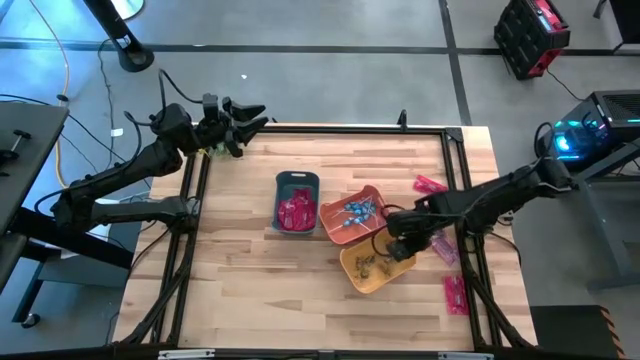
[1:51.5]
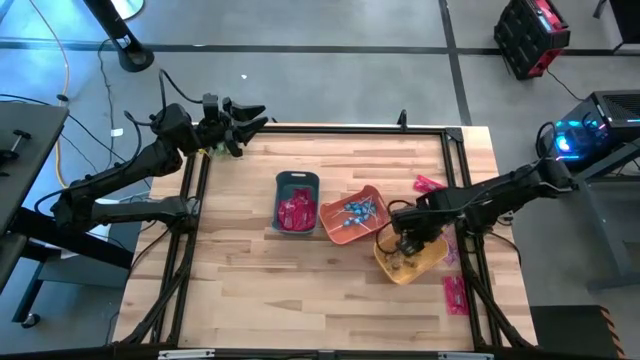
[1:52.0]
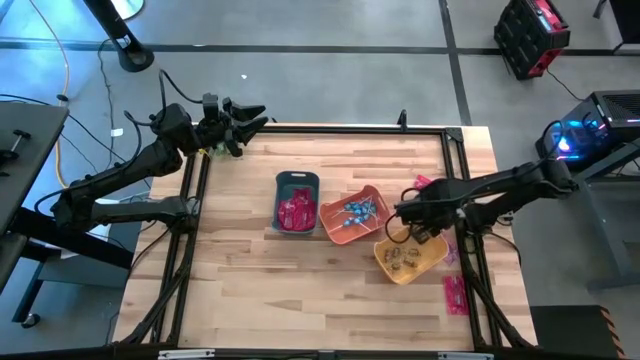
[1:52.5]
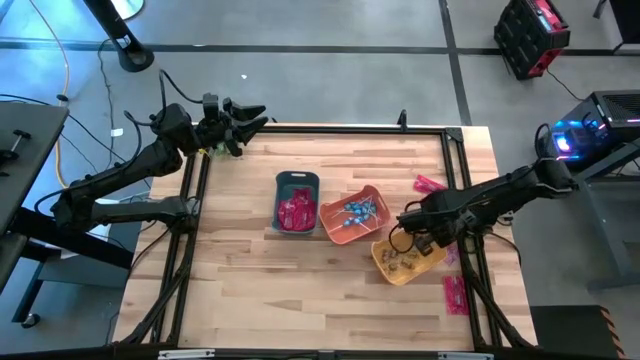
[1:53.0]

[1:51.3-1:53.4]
Task: Sort candy
Adjust the yellow bin

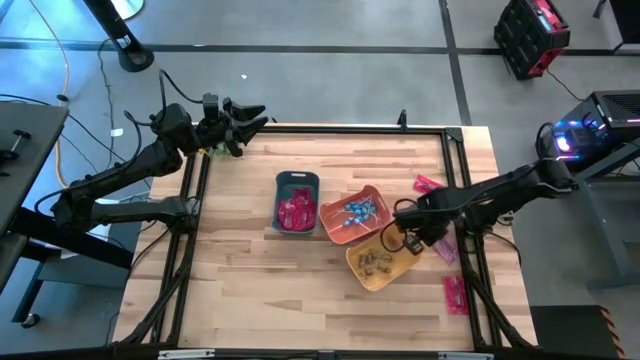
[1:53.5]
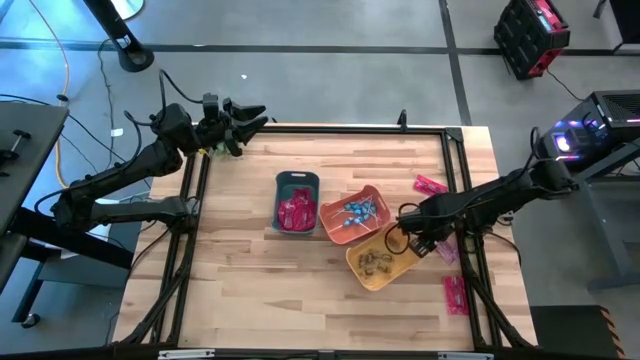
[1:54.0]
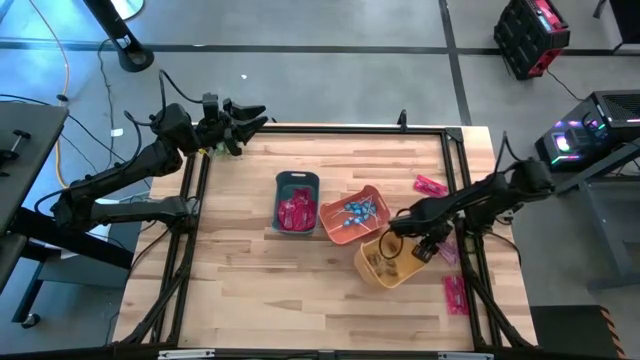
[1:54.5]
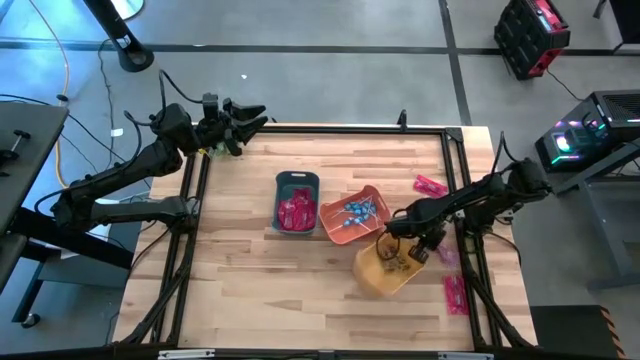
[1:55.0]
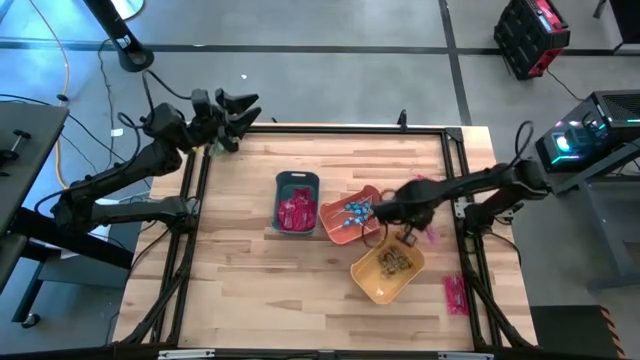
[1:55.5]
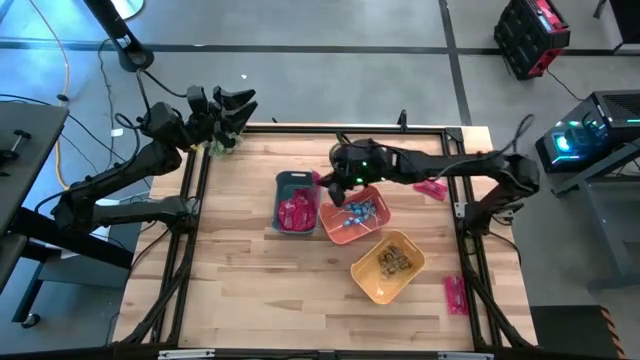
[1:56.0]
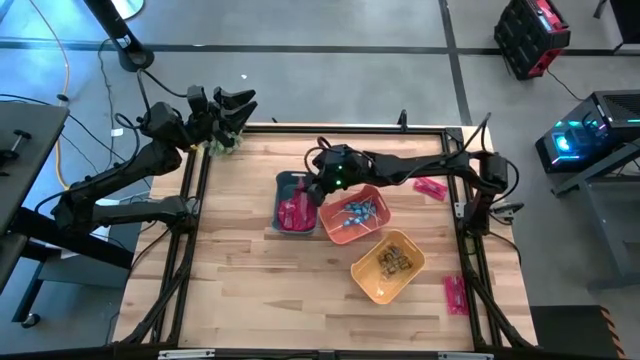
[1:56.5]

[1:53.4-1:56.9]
Put the red candy pack into the blue bin

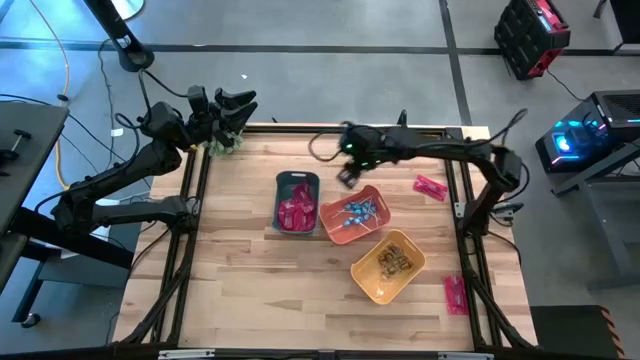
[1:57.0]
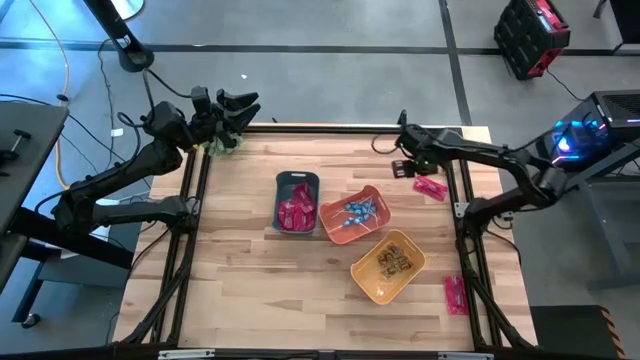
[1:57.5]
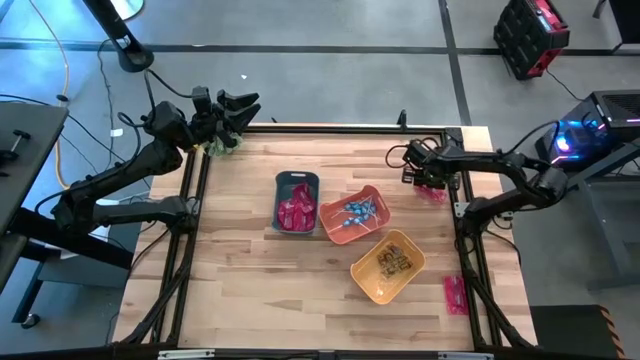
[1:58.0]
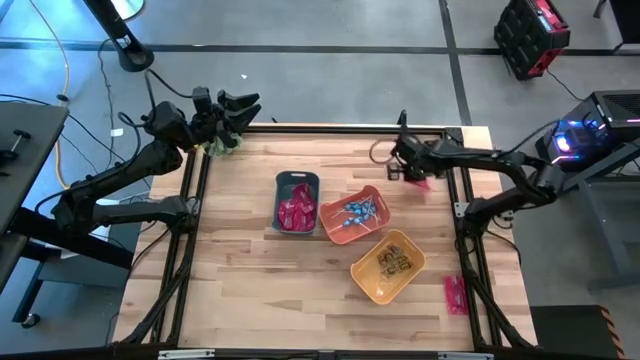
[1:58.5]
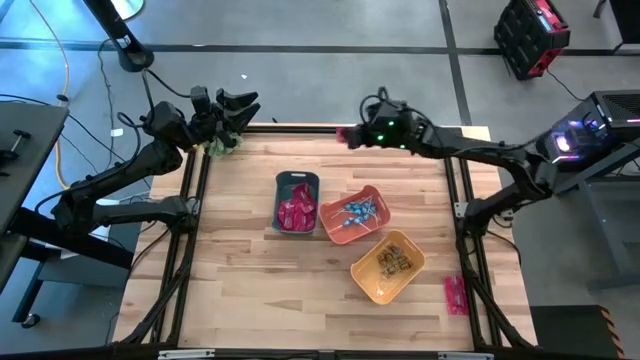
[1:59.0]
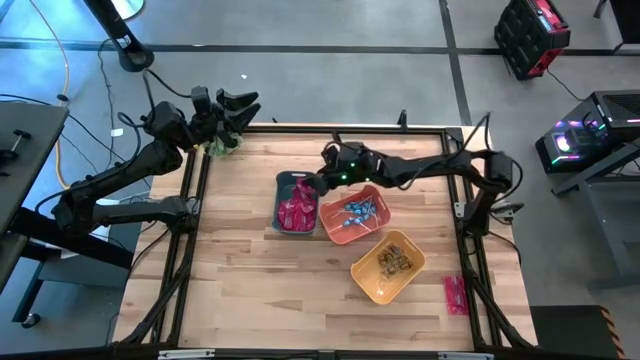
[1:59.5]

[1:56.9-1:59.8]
Put the red candy pack into the blue bin

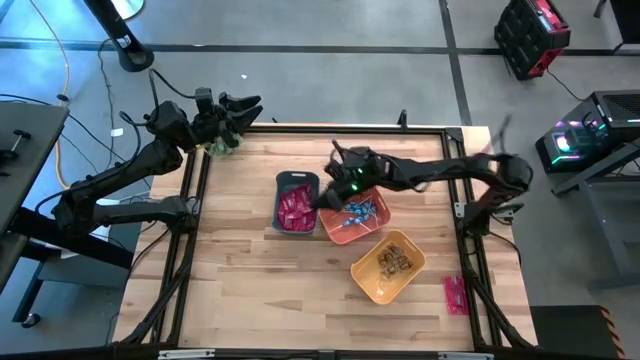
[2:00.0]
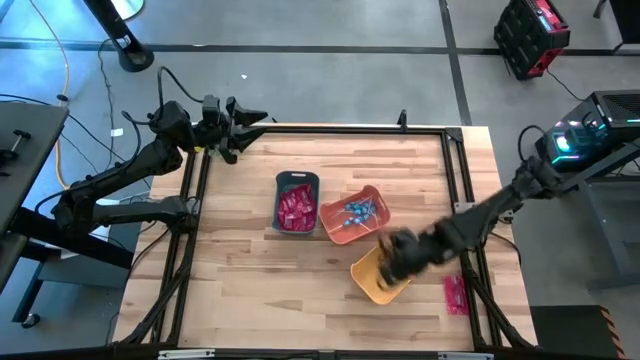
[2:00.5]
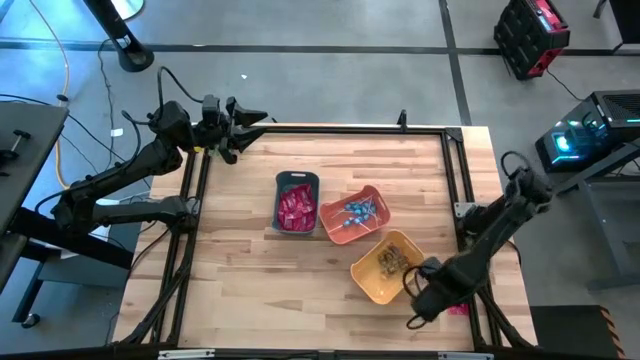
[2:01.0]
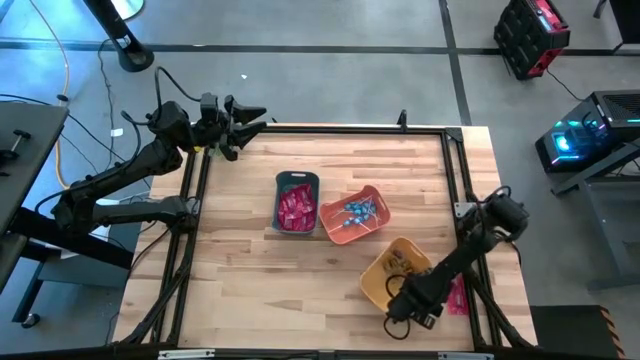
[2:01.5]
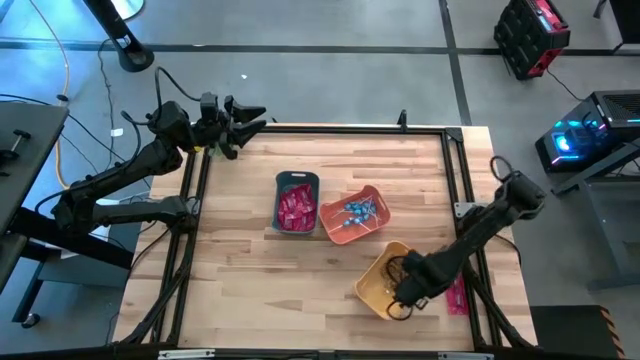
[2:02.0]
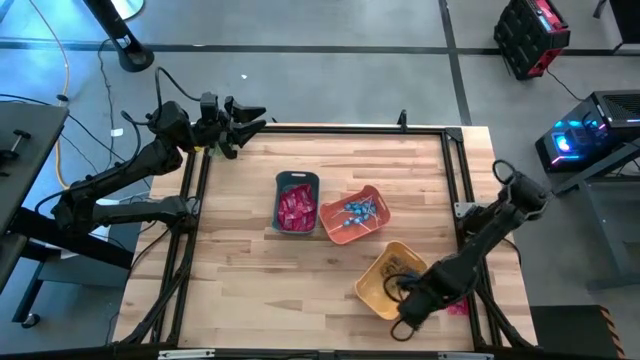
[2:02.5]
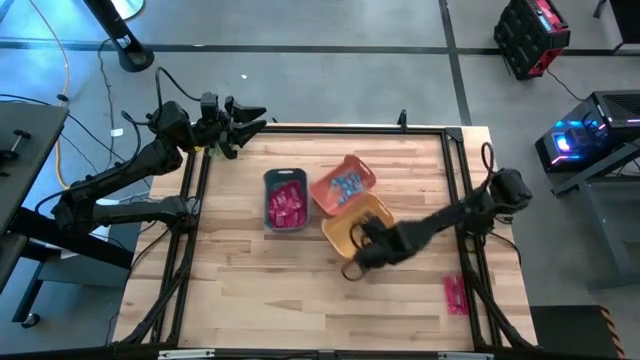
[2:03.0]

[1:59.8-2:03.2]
Adjust the yellow bin

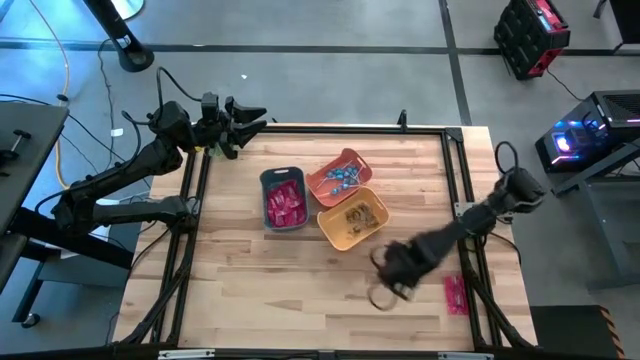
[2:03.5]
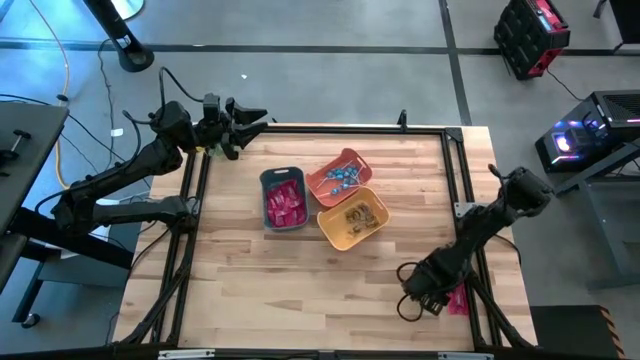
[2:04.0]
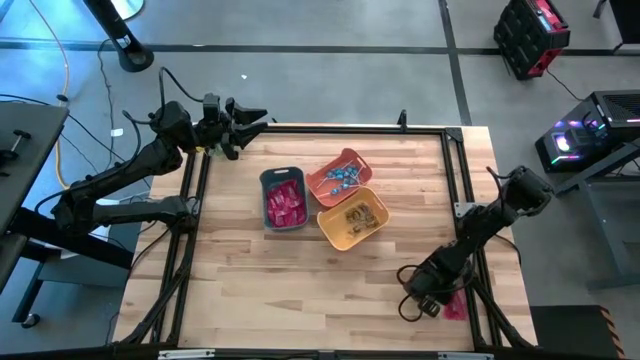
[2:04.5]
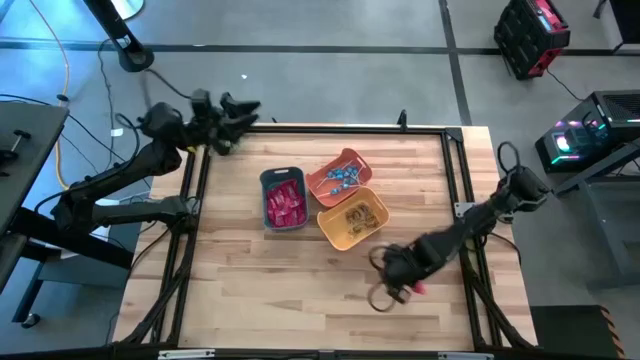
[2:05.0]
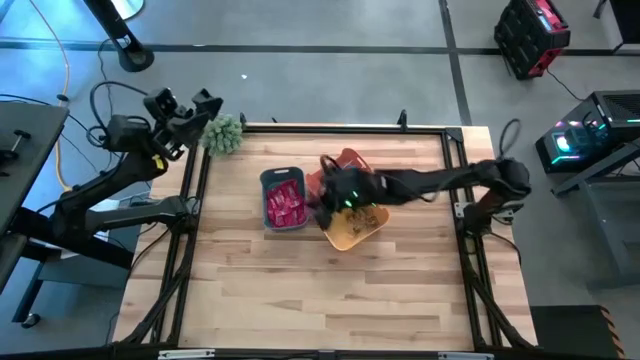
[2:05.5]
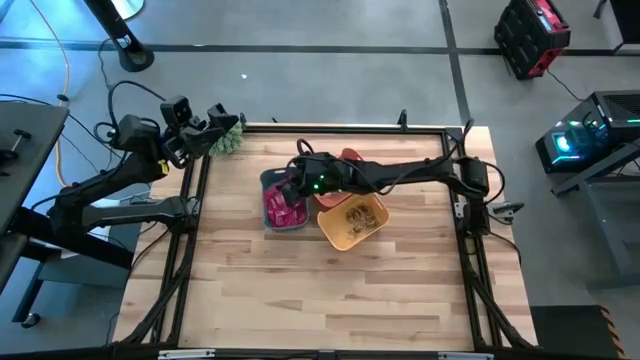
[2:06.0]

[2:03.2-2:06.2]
Put the red candy pack into the blue bin

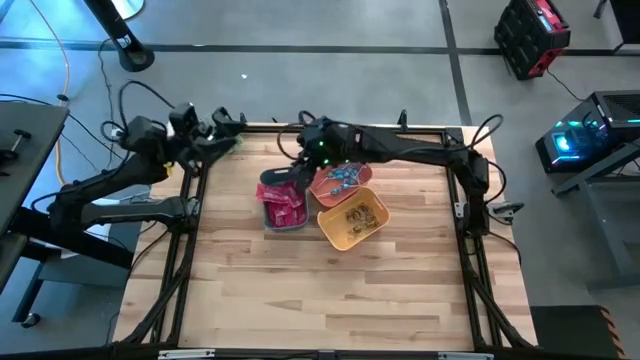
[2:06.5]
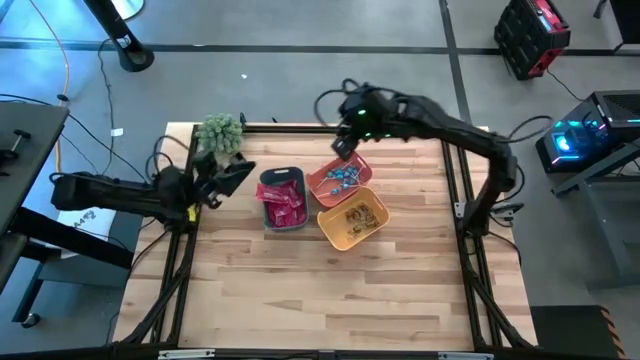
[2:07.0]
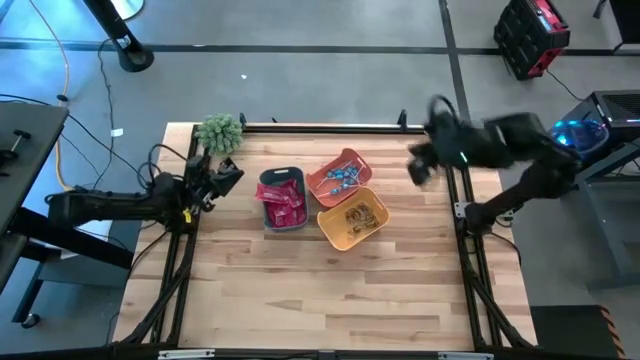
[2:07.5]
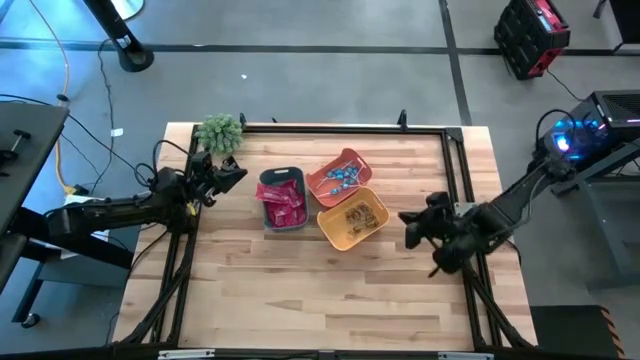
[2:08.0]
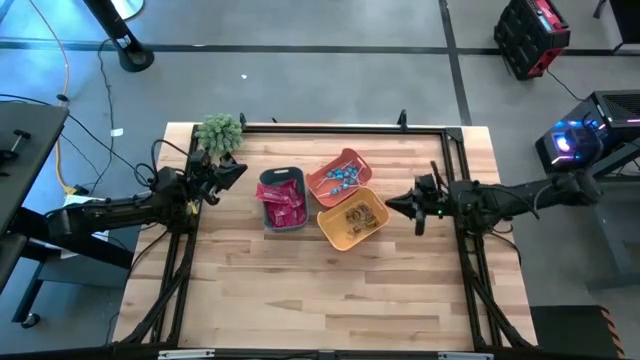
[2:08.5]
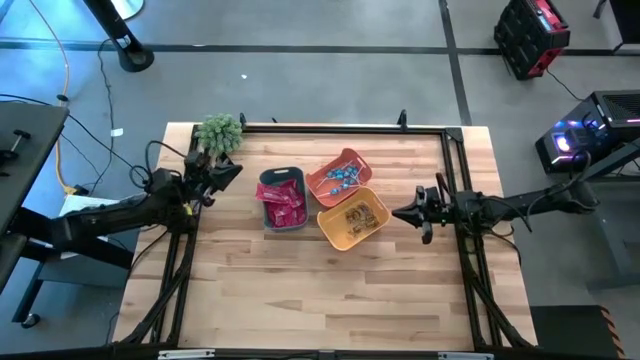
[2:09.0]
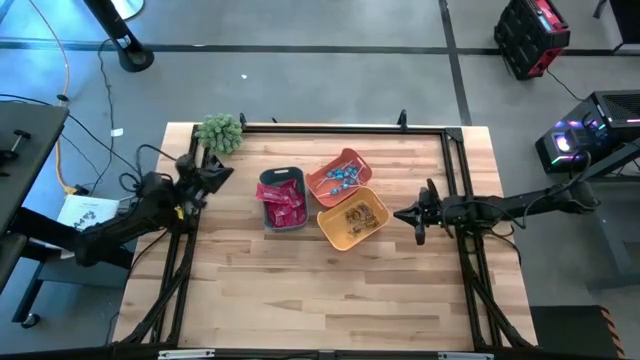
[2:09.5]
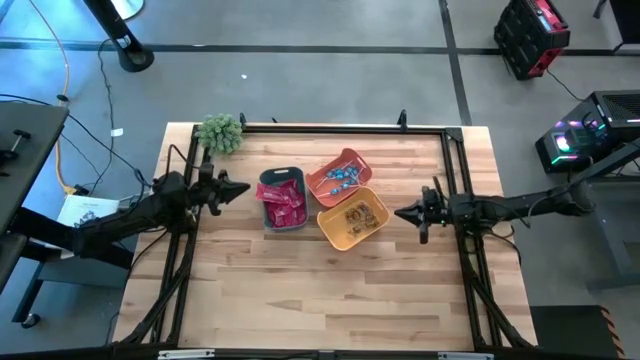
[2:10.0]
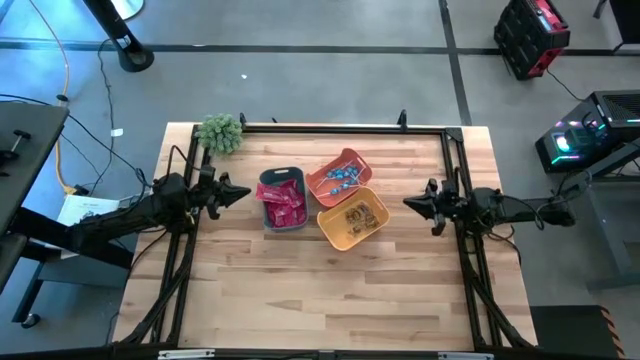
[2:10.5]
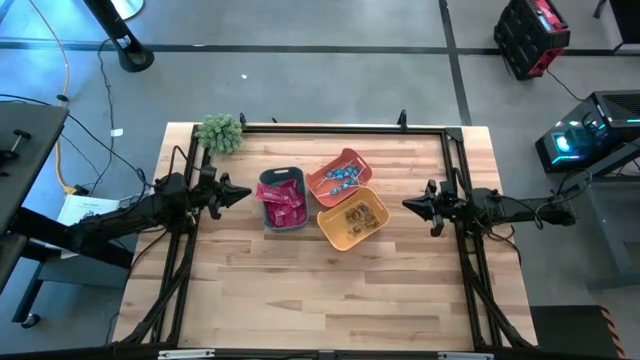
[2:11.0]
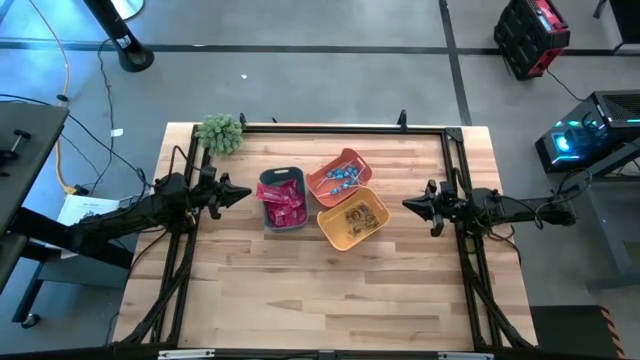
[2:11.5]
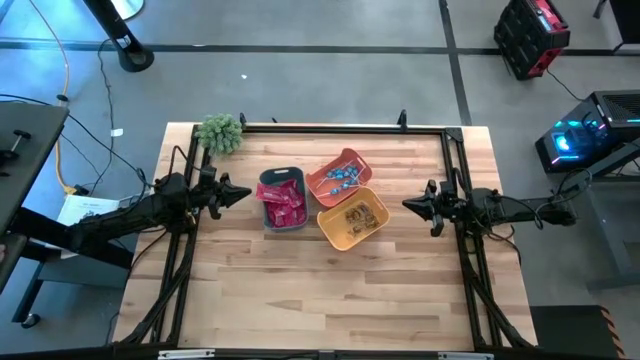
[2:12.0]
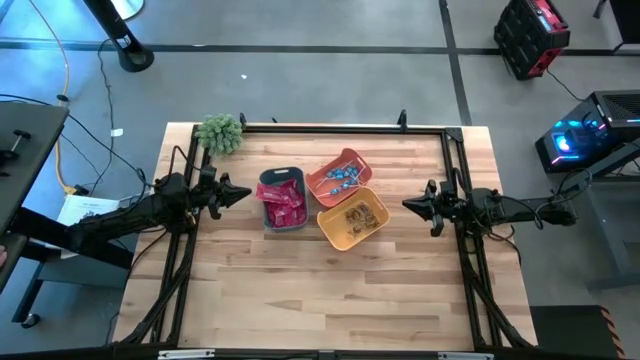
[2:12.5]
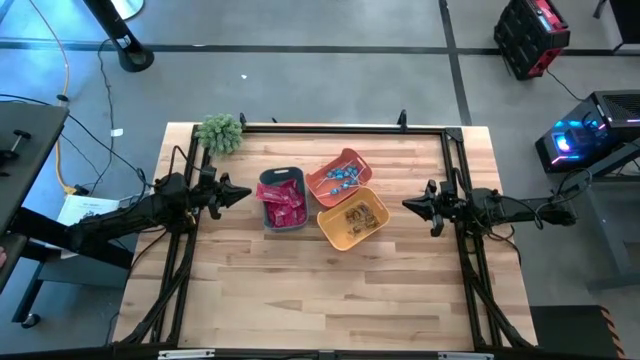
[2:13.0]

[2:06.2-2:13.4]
Return to Home Position
